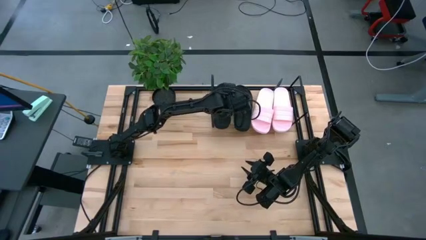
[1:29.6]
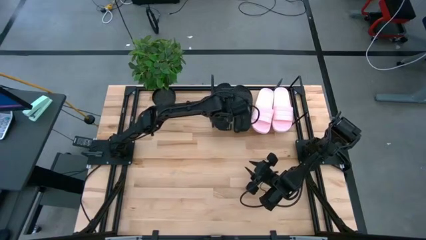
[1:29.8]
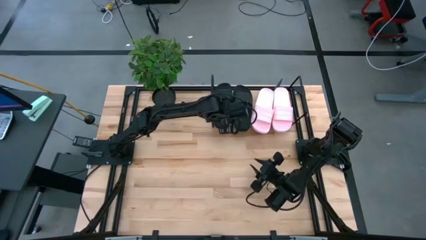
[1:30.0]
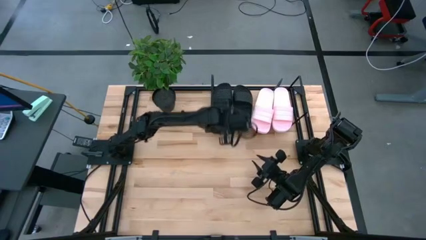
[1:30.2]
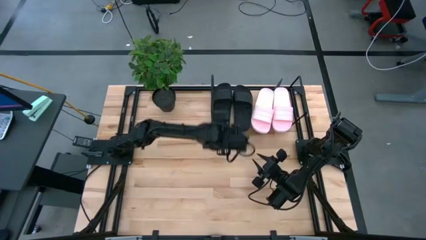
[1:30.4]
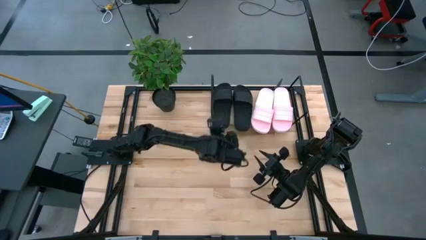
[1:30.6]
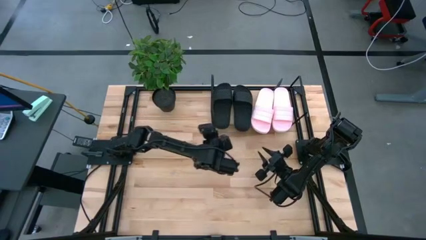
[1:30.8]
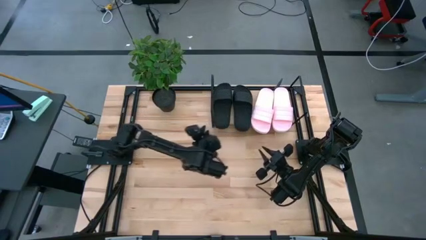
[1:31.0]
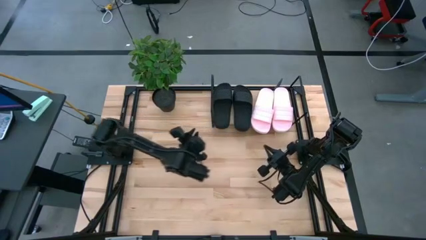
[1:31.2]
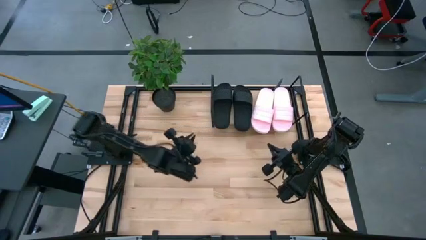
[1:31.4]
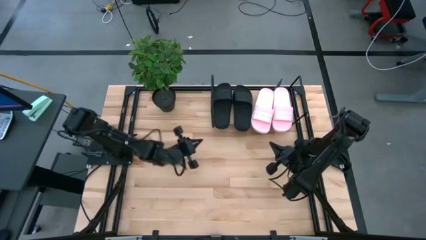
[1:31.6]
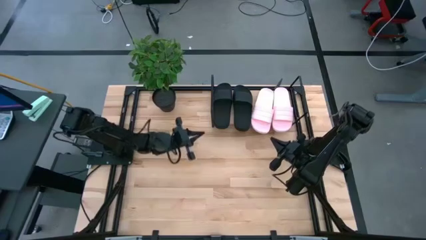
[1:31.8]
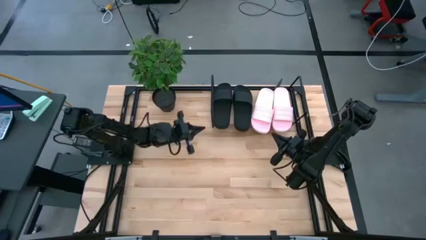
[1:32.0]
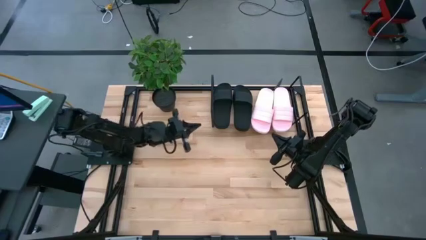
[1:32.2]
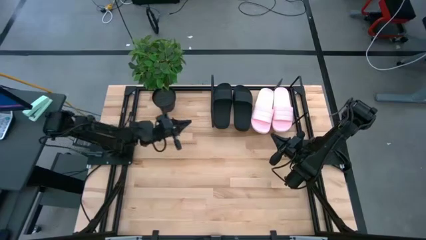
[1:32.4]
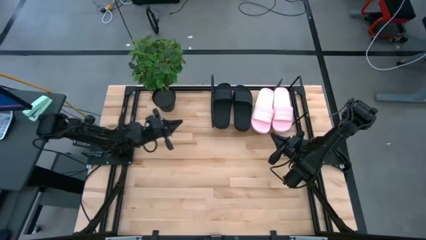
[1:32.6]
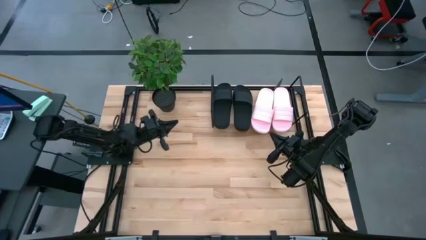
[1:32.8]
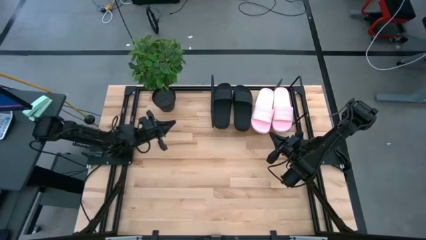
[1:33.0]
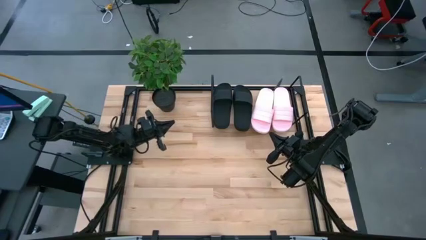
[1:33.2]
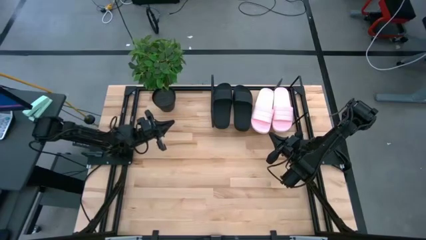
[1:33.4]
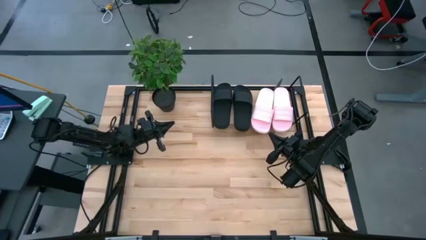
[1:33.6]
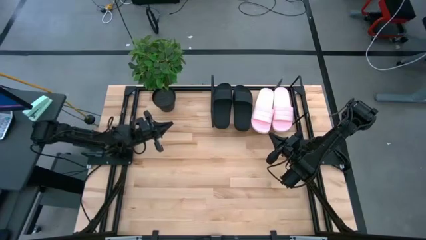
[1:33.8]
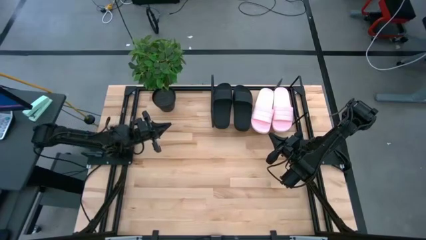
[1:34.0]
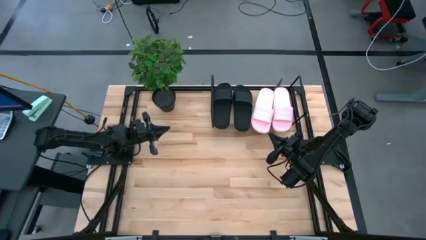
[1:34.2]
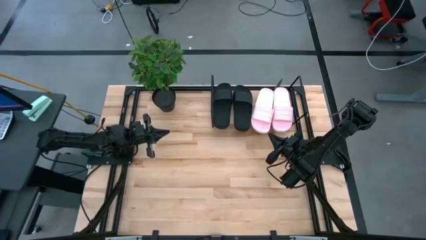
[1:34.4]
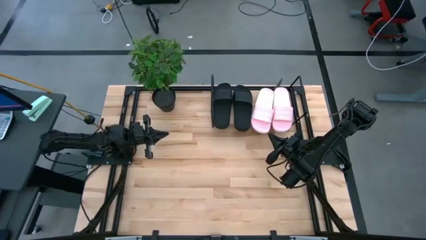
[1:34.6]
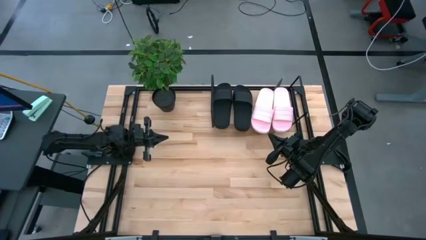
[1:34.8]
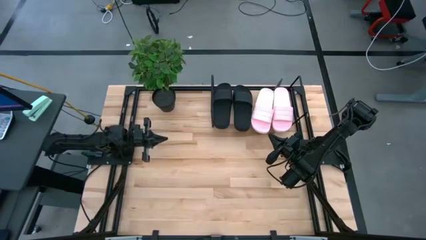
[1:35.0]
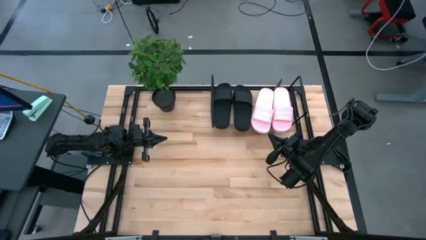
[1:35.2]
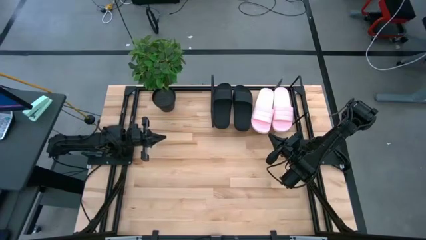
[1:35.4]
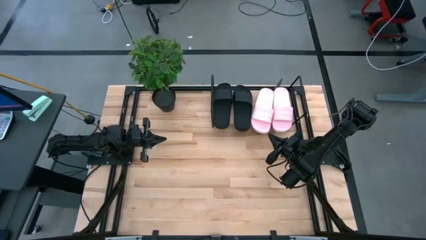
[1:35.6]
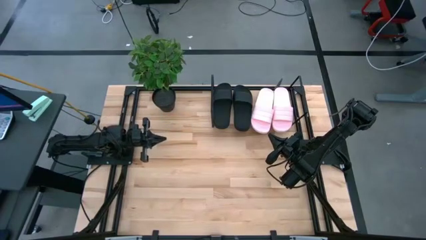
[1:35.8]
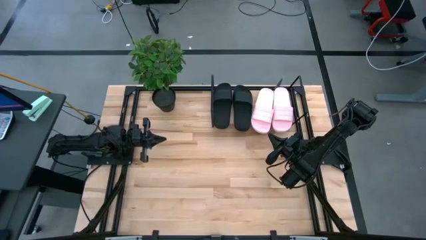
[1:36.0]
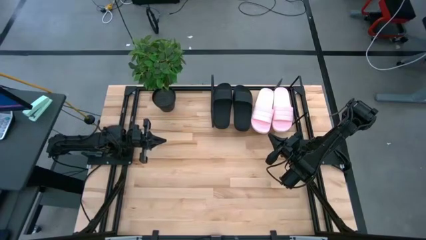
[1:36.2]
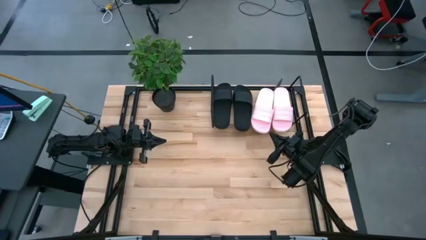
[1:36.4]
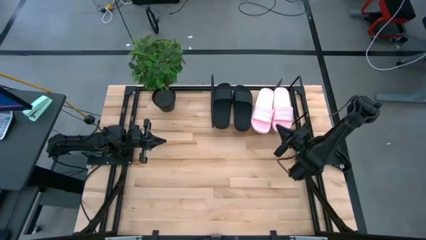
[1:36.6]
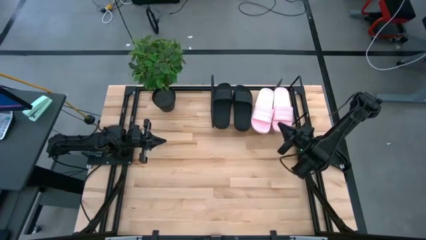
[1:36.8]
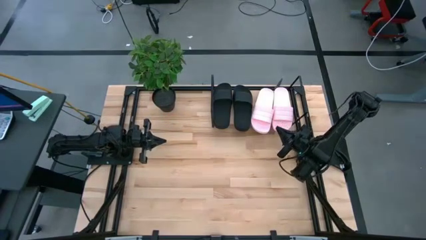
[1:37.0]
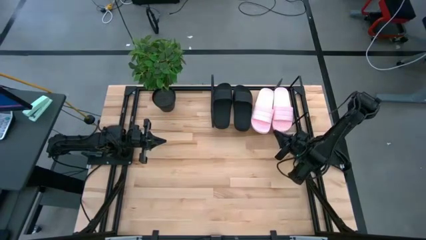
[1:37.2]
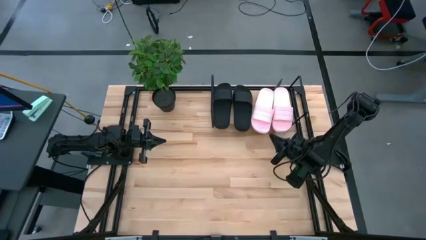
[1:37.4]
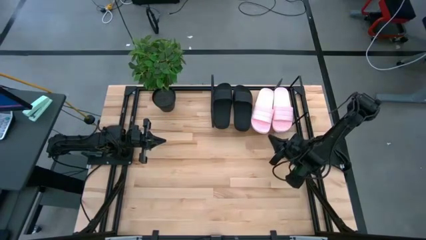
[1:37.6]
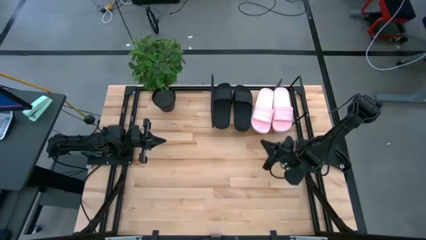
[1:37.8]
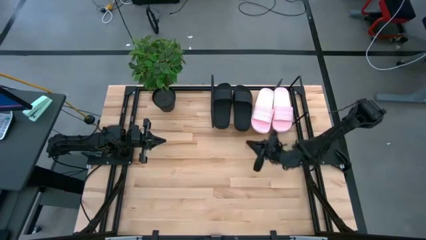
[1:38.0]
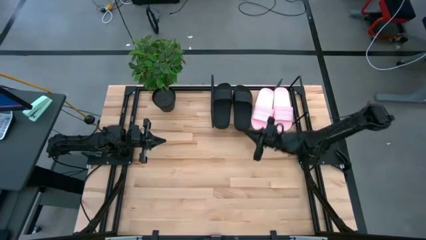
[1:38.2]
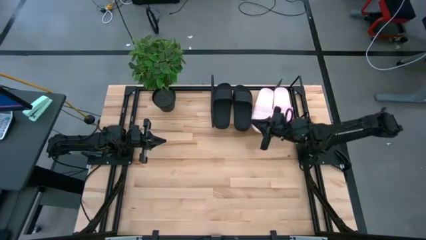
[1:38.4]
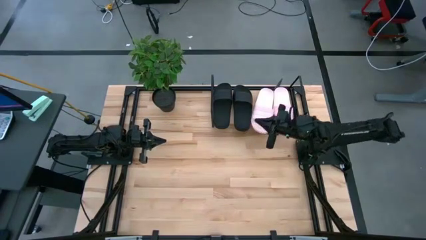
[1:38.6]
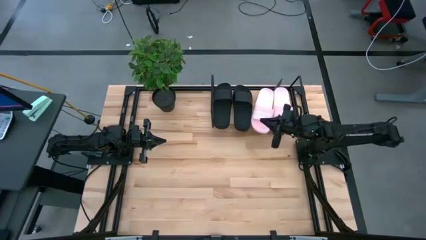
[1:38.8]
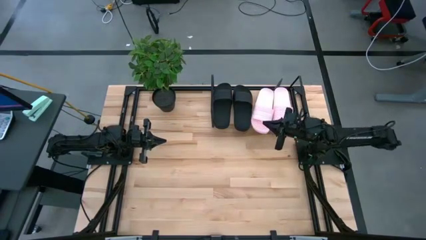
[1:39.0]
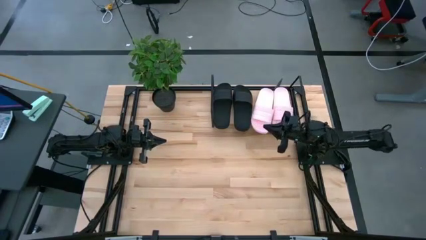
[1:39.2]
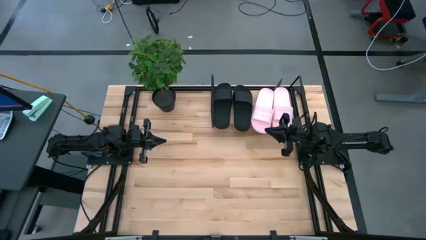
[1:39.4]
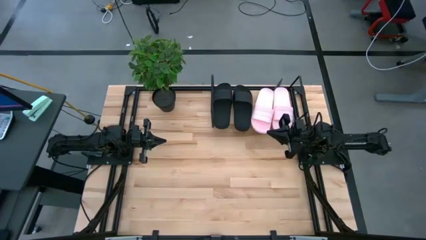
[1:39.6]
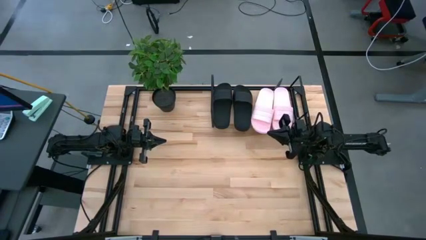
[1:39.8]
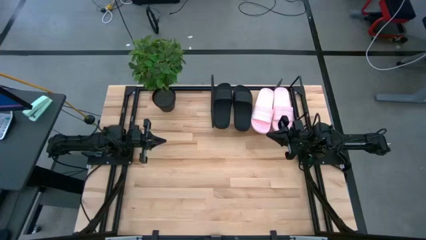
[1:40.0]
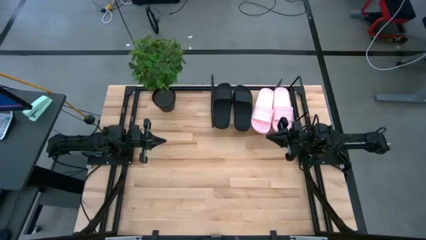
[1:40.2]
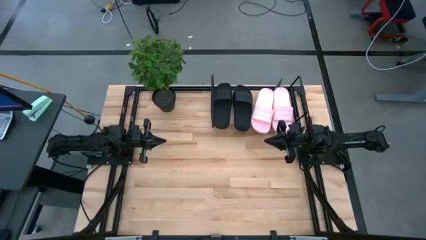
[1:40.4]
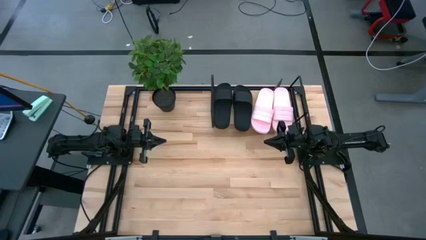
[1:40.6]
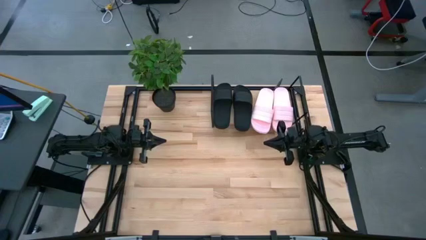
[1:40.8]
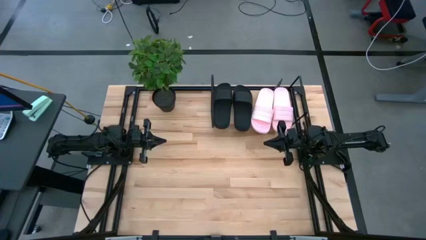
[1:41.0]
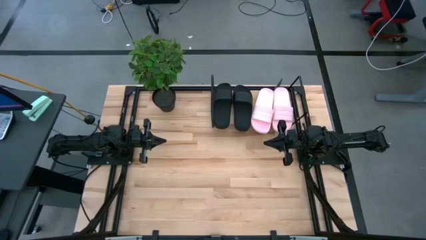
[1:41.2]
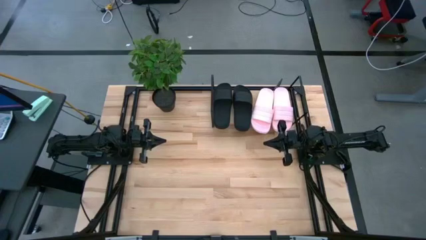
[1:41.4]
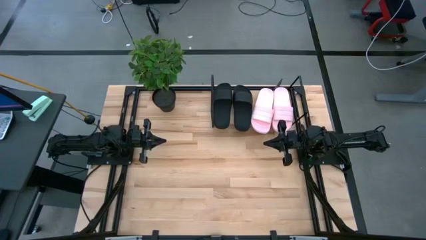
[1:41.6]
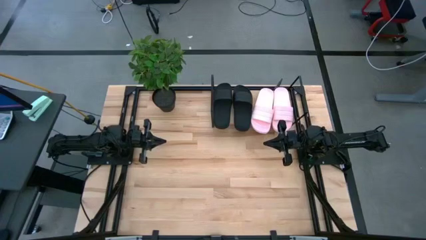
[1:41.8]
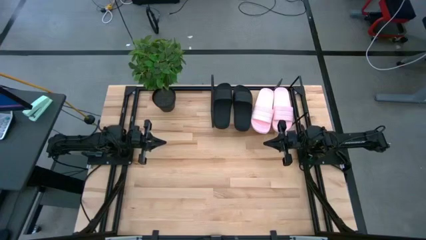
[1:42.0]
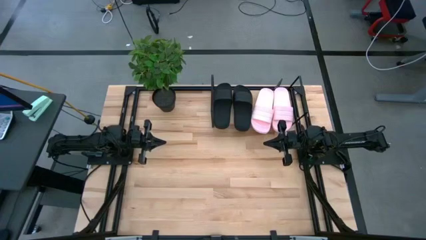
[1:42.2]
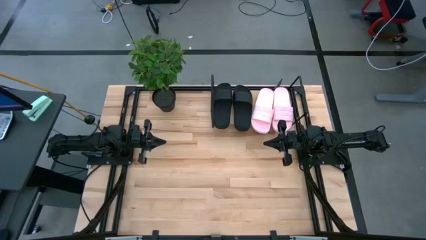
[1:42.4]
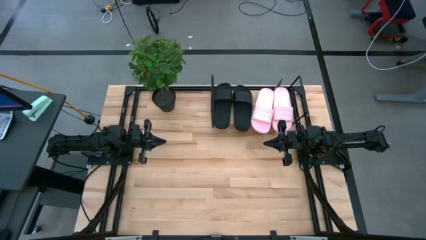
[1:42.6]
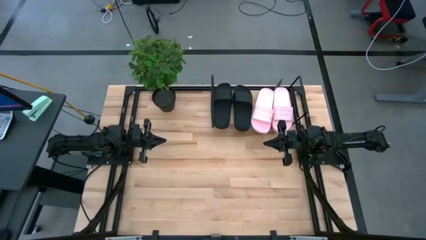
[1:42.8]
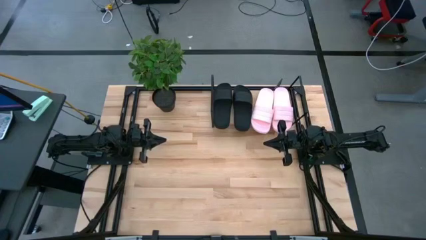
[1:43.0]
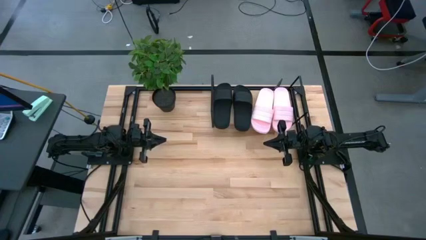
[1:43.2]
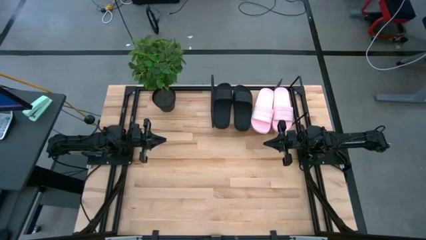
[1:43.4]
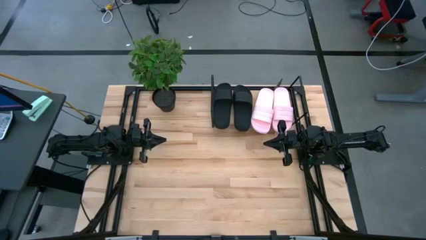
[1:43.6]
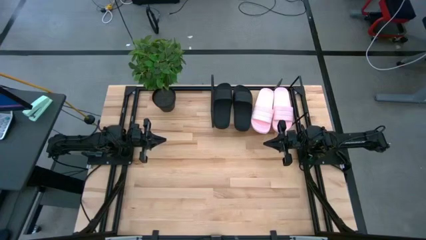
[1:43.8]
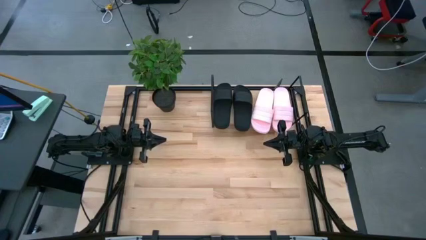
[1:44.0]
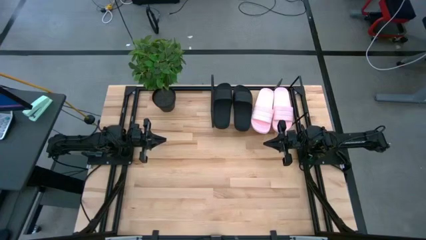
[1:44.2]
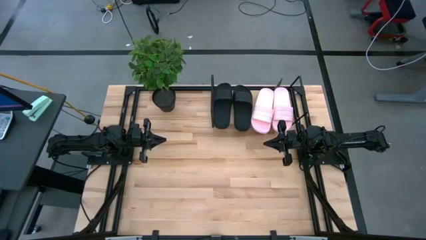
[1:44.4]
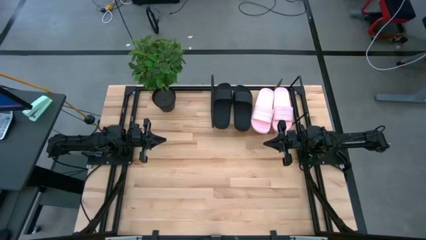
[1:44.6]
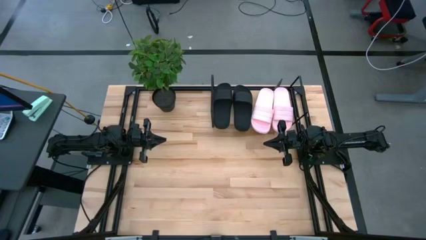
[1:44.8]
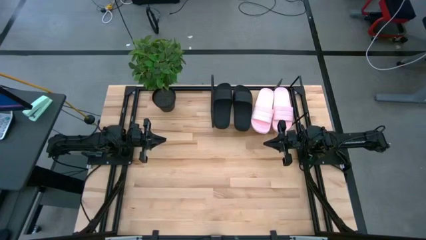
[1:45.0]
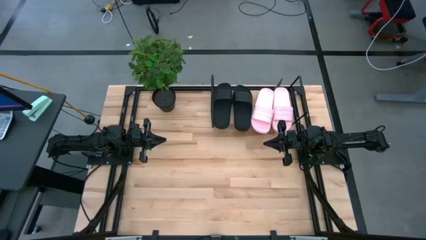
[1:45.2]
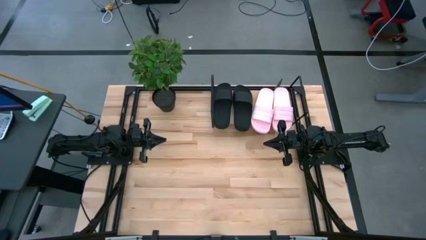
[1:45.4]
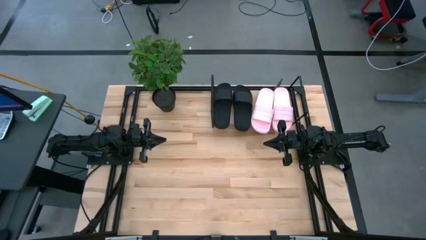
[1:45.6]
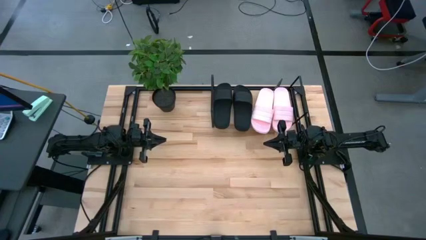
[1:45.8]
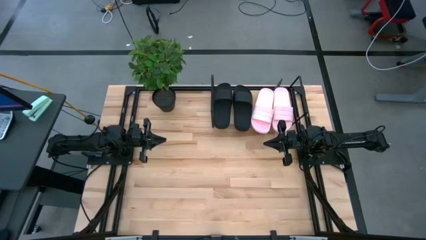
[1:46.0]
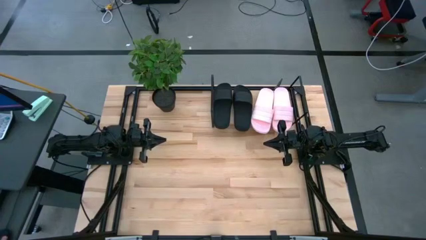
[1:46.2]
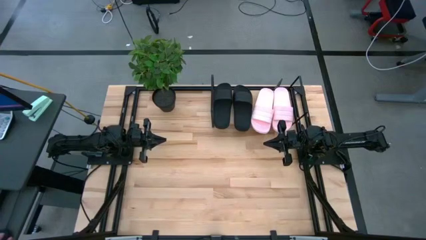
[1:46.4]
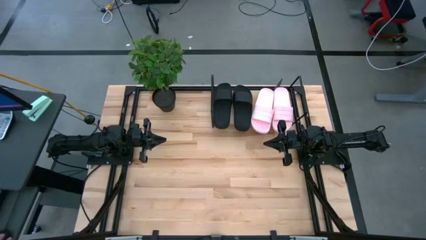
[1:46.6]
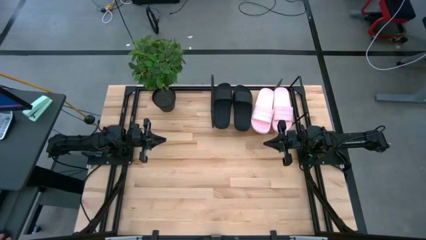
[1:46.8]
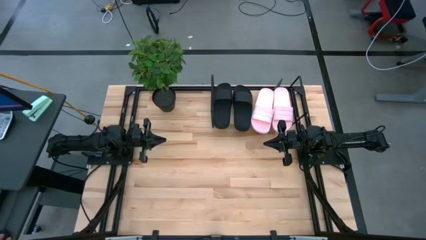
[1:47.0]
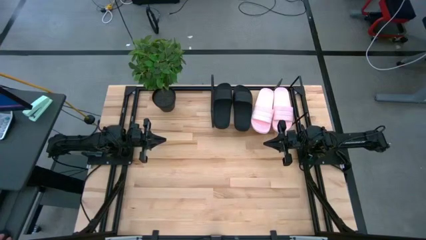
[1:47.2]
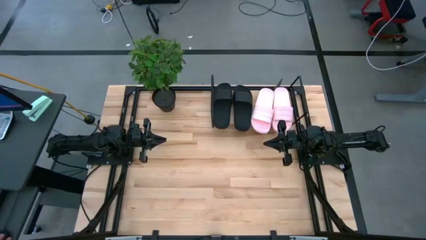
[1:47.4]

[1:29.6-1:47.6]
Task: Pick and place slides into the shelf
Return to Home Position
